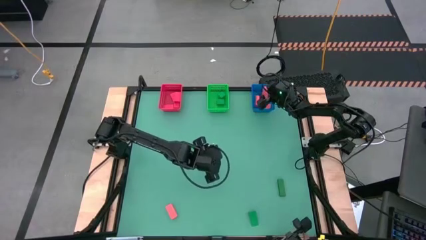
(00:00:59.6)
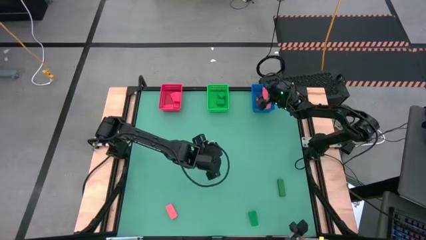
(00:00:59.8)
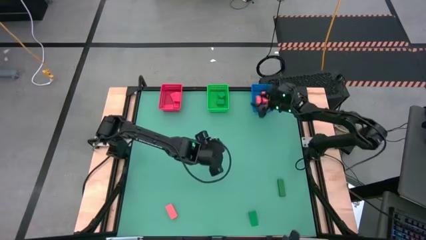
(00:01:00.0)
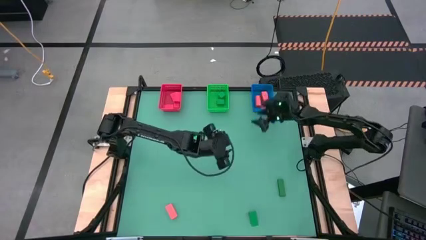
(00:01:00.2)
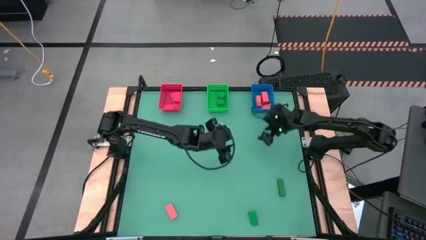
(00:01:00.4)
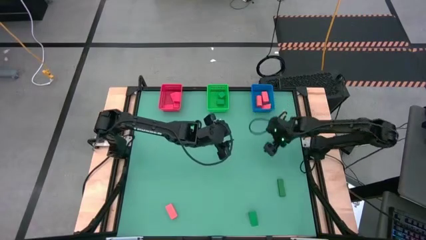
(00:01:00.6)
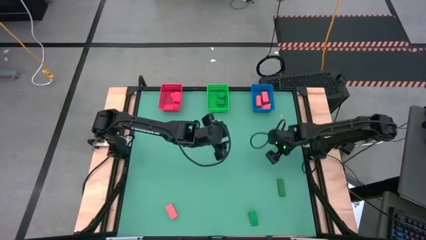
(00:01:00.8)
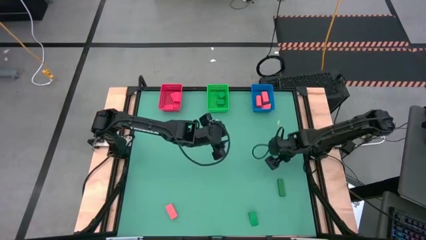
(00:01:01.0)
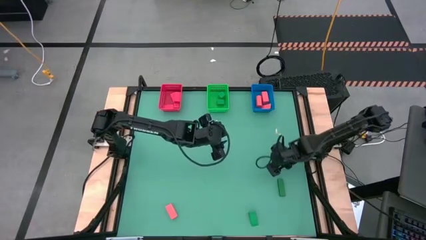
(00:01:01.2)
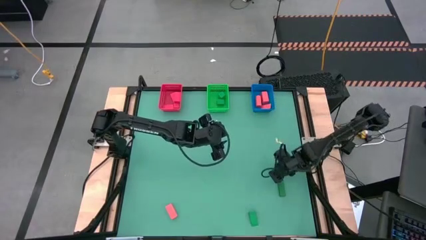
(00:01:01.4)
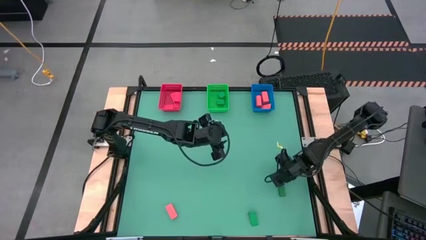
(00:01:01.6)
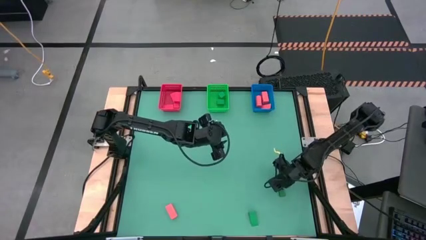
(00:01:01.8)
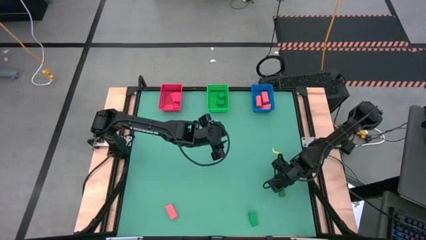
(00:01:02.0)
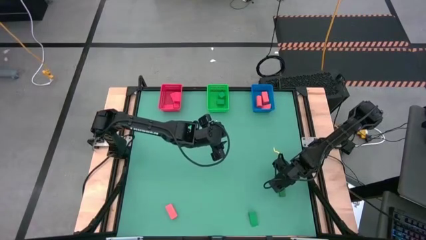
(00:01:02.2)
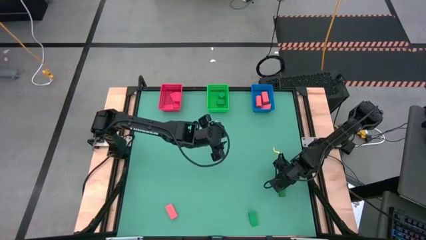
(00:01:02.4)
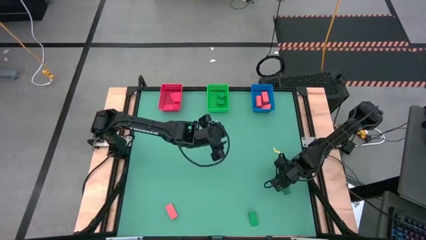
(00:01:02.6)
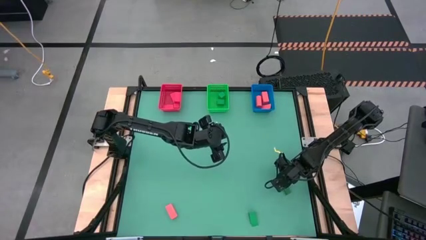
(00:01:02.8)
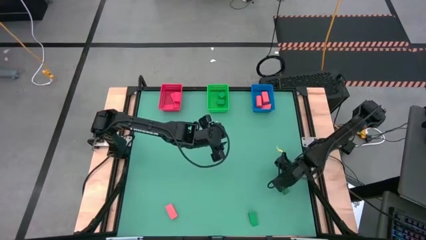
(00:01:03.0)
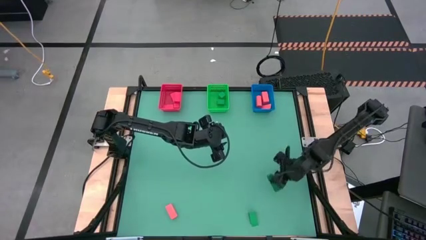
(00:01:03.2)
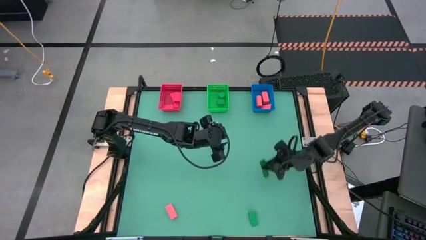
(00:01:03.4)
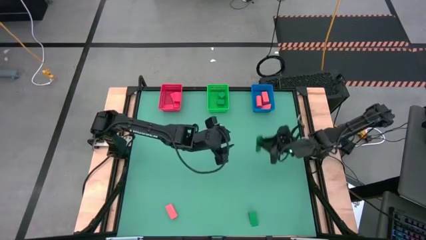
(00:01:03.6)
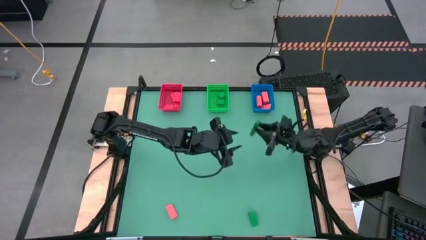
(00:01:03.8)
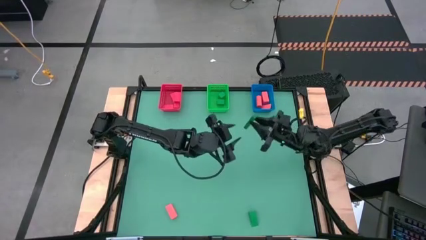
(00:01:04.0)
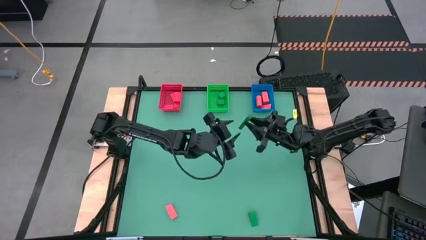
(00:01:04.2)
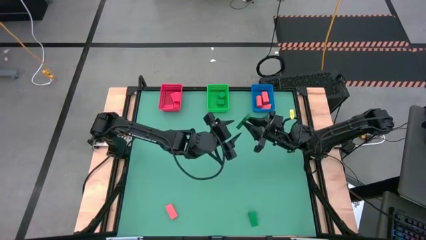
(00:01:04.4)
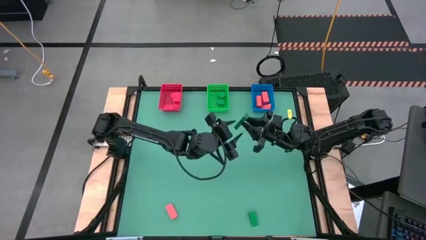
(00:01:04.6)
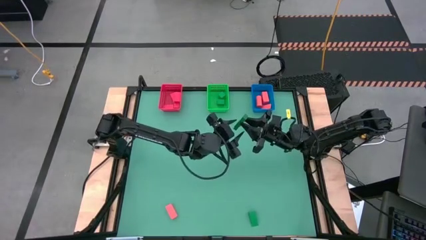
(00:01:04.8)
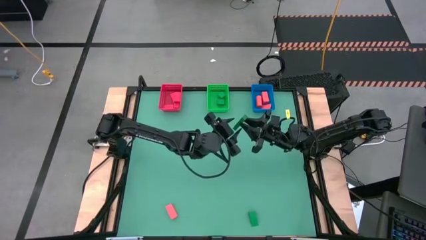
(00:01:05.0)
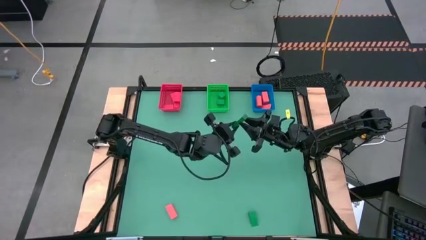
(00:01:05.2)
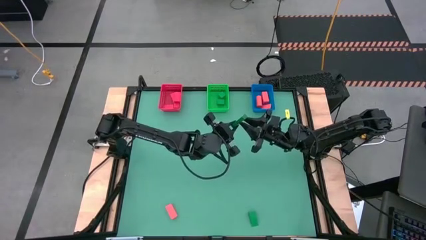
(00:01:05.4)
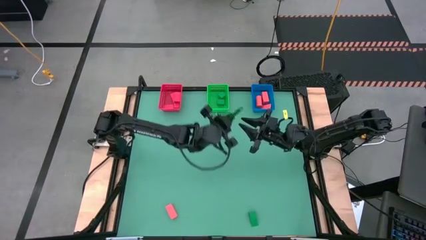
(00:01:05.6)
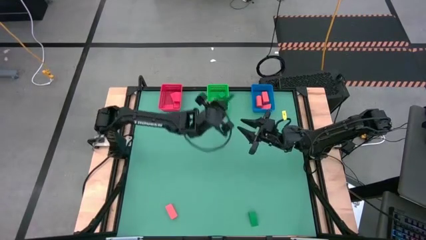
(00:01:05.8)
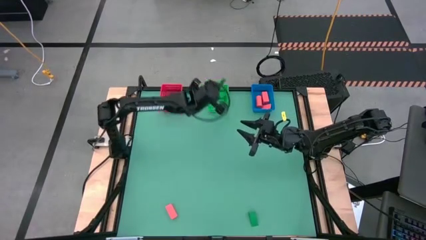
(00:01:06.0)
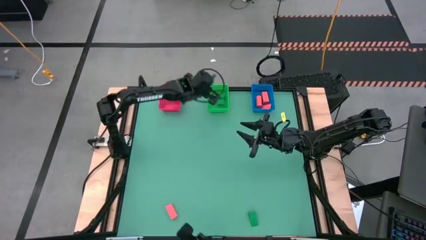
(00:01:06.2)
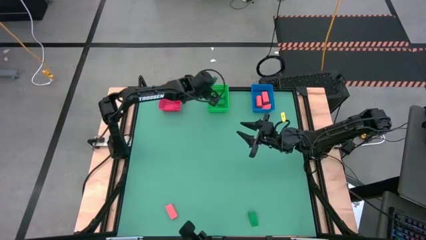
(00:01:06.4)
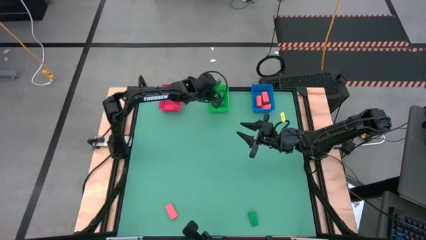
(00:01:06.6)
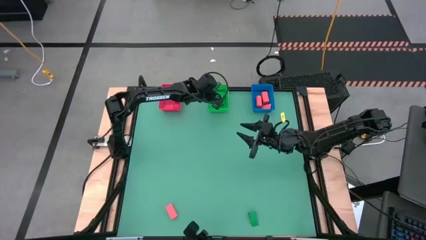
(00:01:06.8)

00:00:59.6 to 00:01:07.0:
Task: Sort & place blocks by color
Put the green block into the green basket

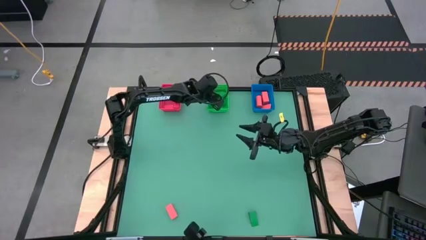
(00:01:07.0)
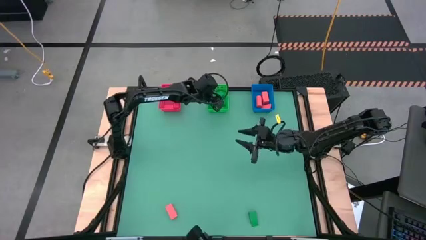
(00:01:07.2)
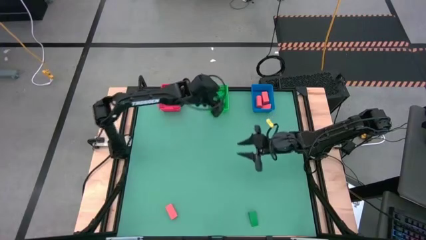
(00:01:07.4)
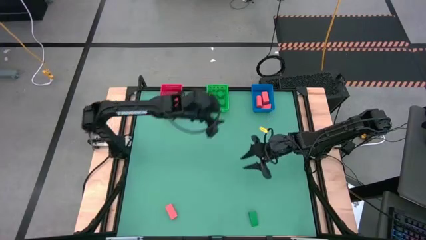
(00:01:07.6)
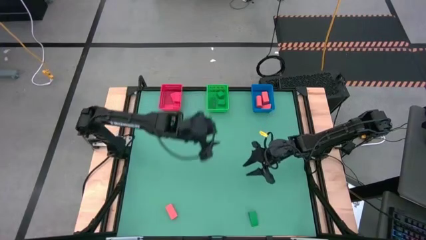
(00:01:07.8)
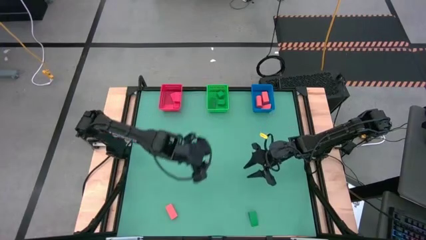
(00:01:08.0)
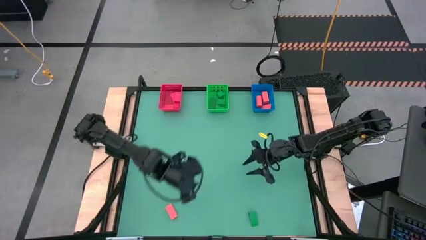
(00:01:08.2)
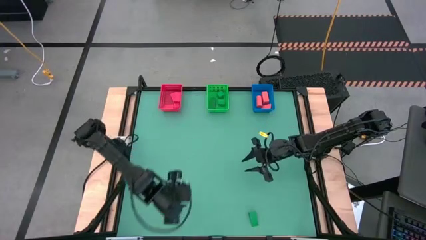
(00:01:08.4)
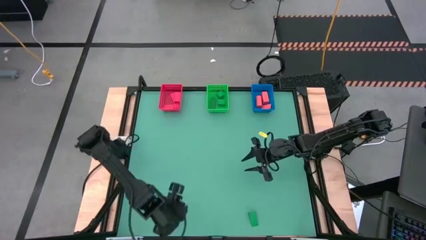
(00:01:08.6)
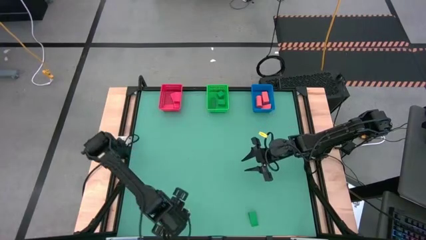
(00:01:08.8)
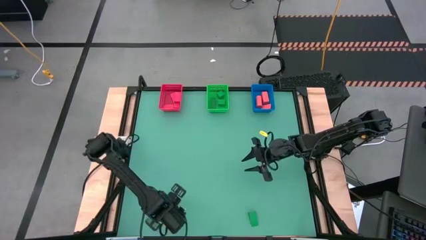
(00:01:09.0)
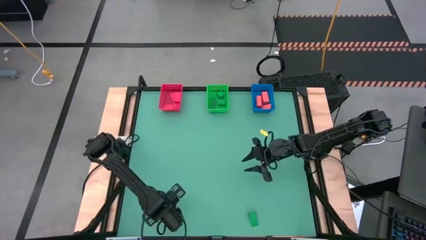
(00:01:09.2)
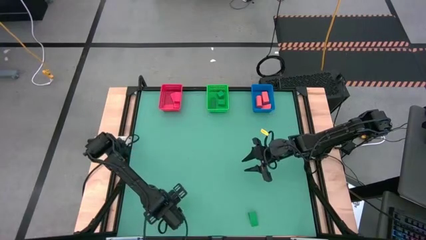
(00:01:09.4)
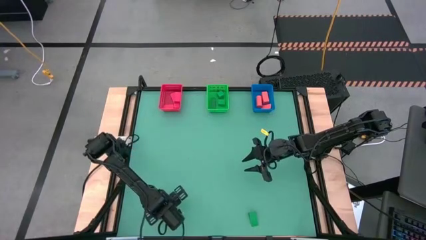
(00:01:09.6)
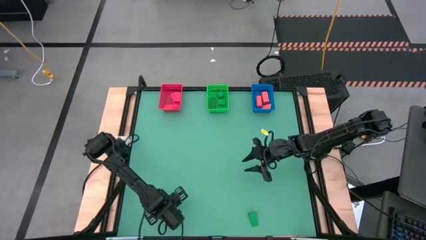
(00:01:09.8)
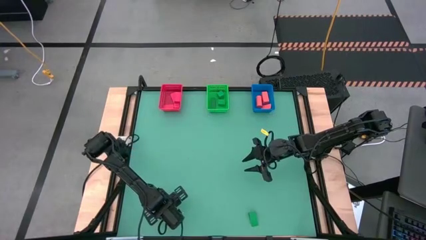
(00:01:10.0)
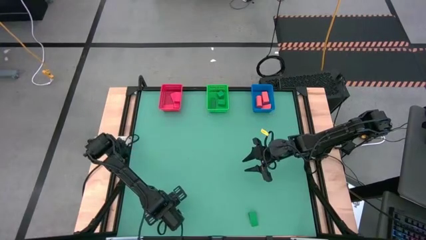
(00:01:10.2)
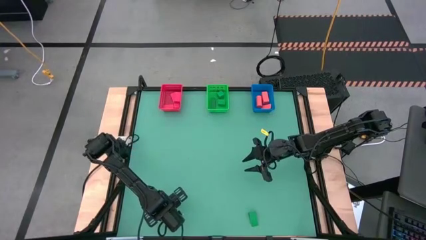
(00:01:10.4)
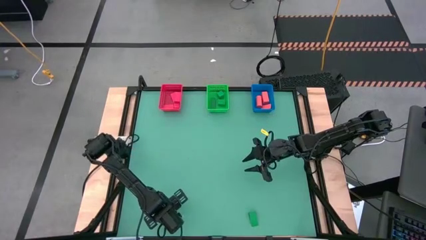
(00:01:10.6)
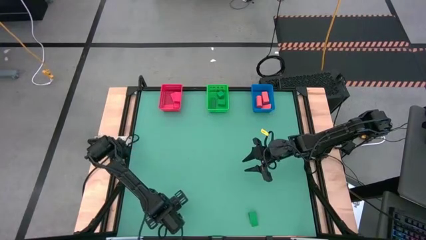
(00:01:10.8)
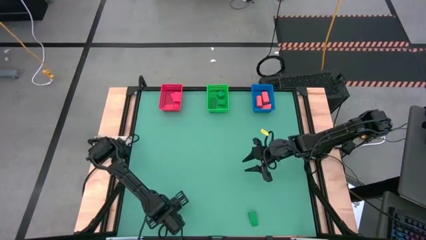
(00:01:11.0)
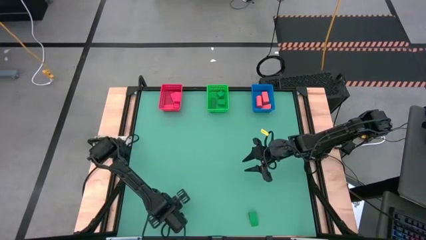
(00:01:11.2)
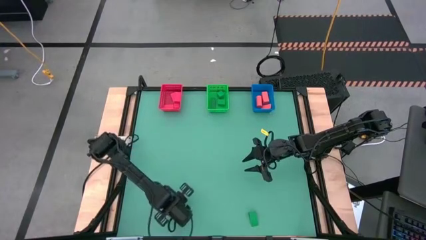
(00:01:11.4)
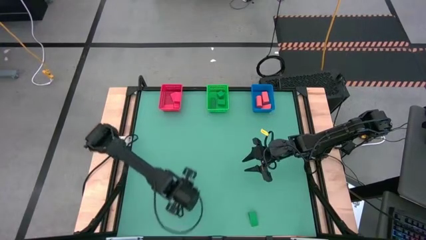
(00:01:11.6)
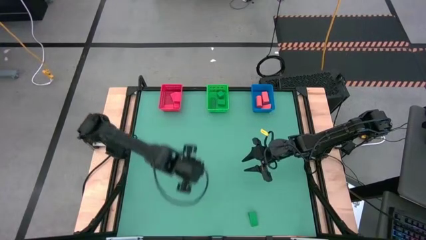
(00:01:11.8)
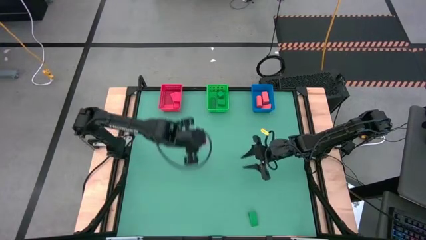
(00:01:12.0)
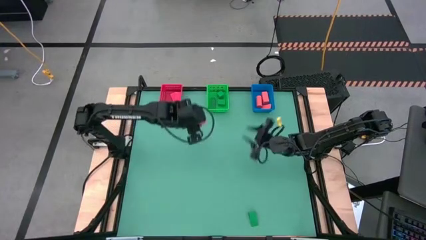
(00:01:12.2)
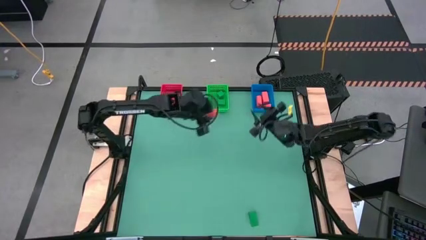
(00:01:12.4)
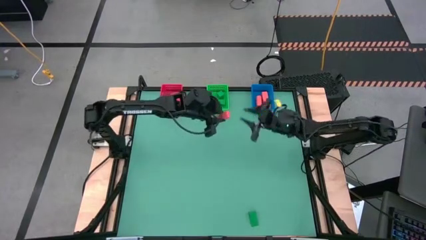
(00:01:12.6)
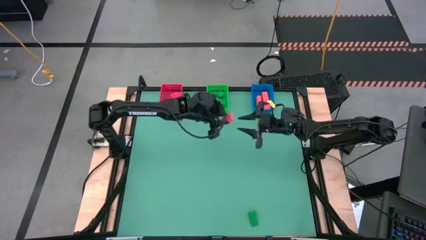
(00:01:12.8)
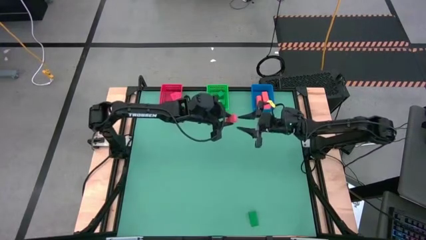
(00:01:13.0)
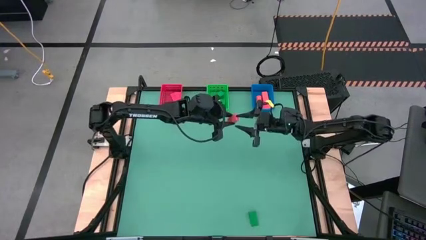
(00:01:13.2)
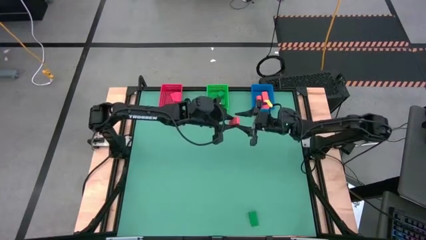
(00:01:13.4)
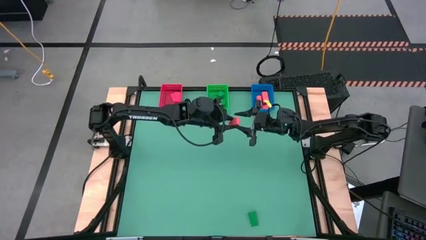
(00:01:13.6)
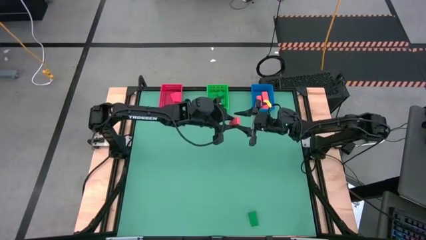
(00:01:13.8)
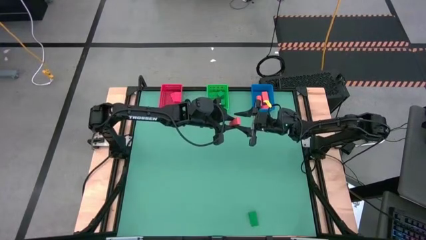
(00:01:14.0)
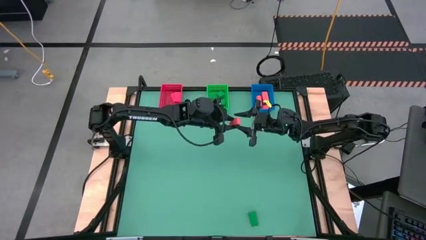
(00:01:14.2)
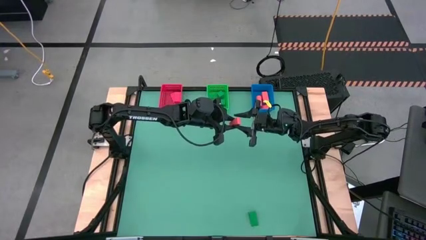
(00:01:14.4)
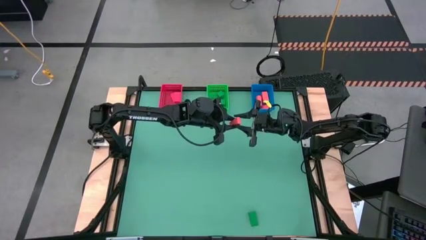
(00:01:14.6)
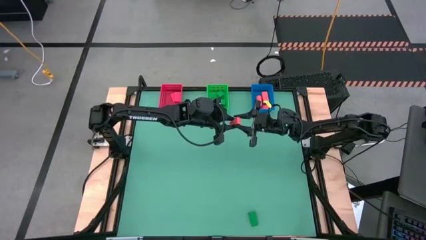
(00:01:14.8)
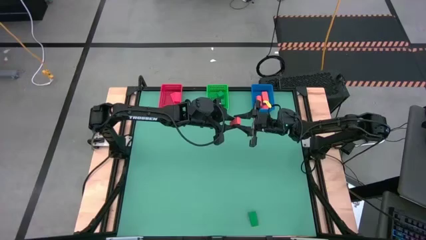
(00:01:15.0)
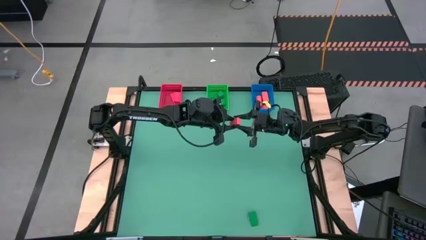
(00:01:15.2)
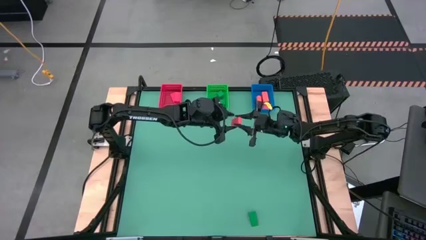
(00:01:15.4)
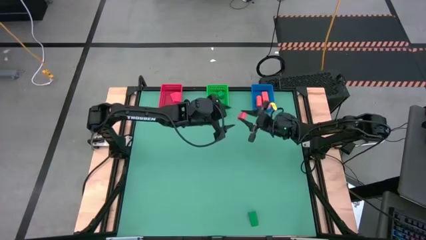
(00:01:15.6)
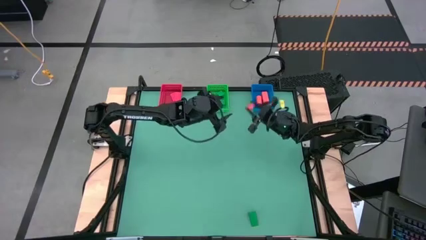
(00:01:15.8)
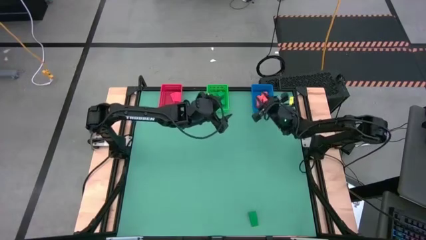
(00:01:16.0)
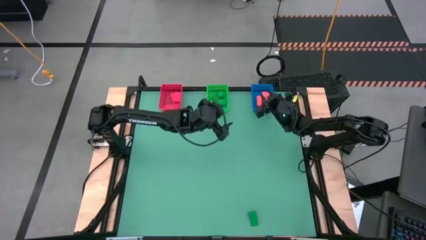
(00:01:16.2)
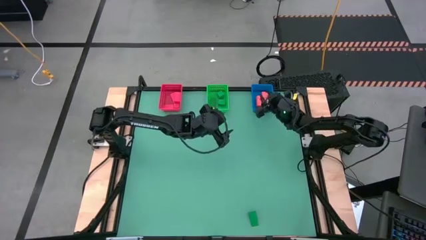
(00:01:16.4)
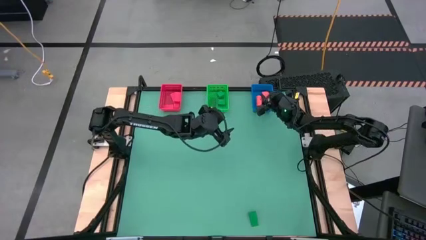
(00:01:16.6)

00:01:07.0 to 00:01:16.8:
Put the orange block into the blue basket
